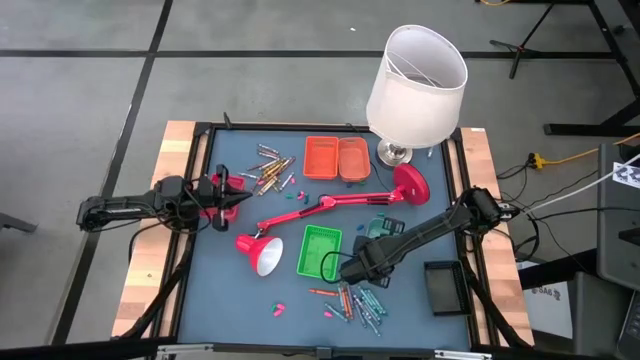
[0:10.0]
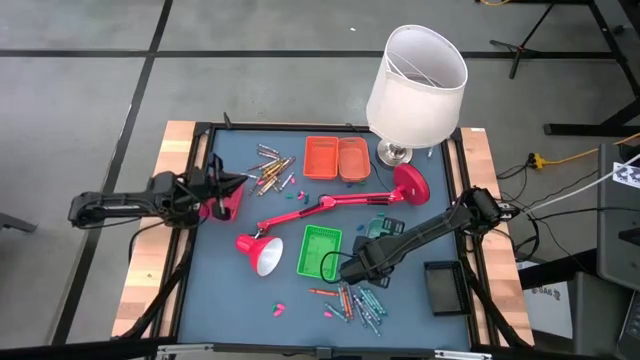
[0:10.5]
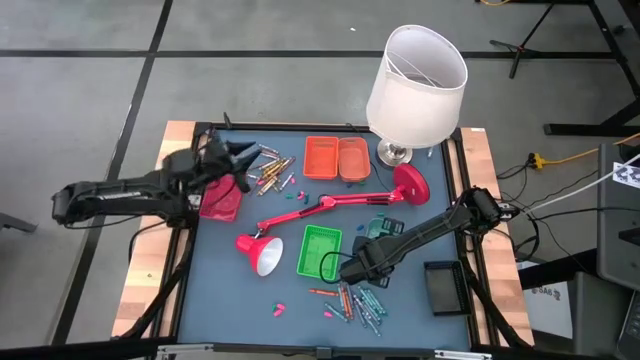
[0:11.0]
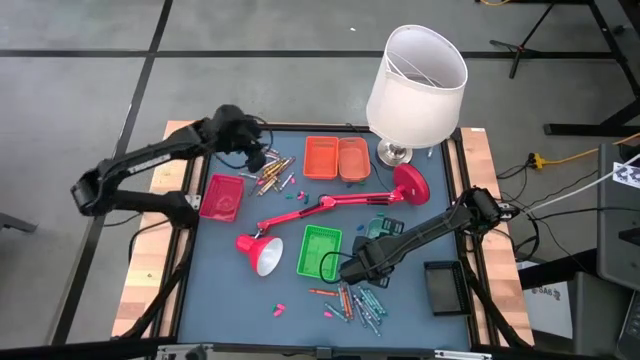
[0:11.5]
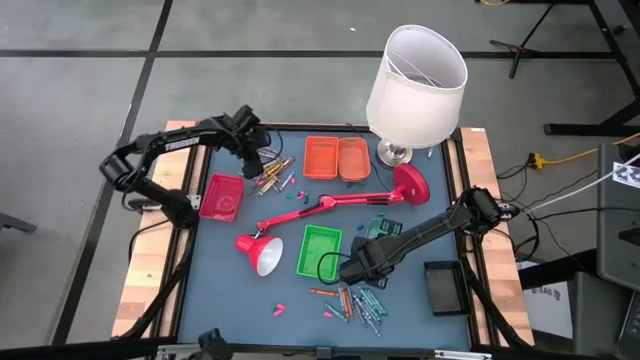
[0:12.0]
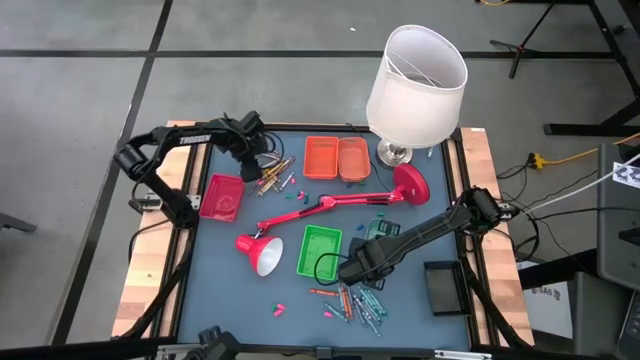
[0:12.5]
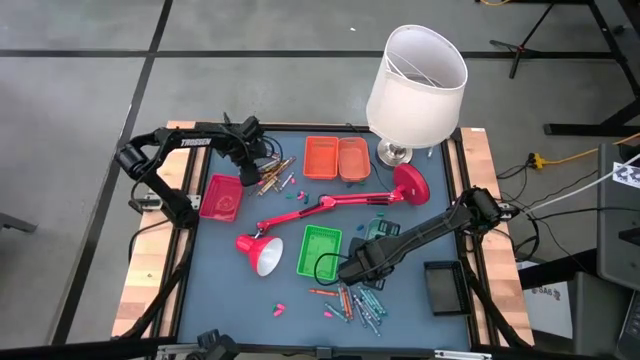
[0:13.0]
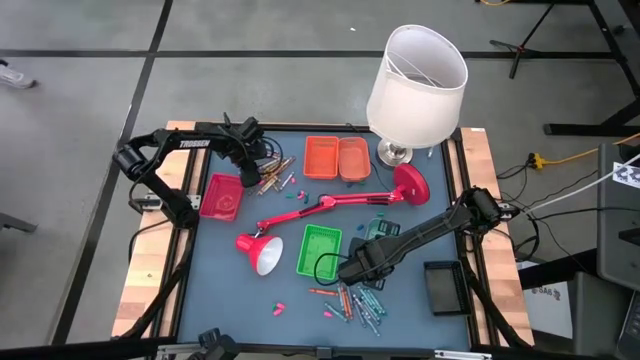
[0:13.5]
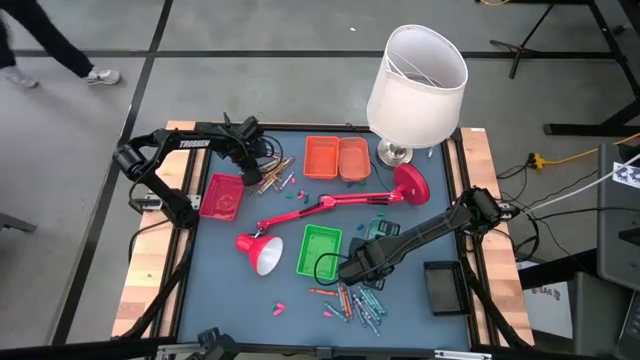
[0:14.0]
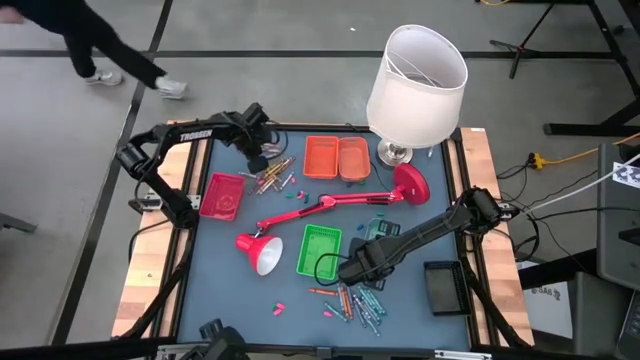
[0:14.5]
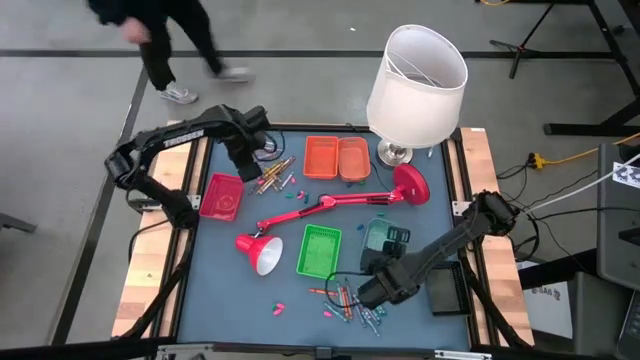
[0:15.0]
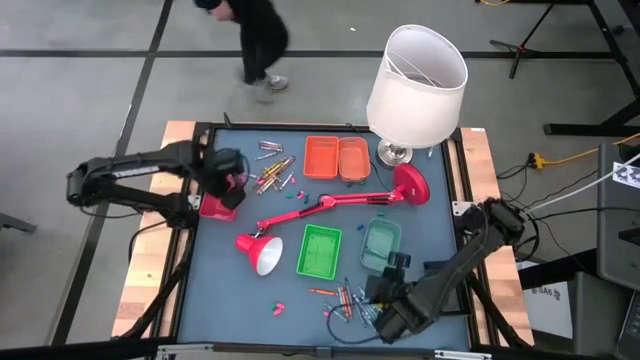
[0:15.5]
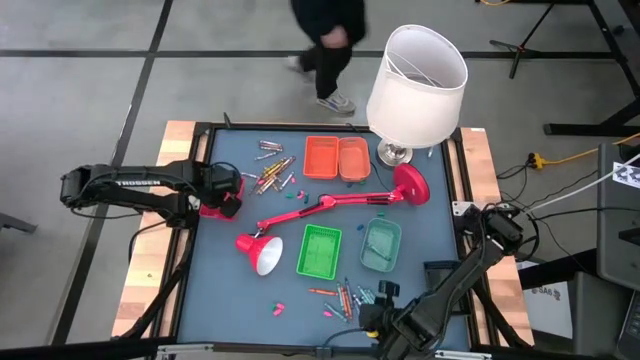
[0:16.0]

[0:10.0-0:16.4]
Task: Sort crayons
Put the brown crayon into the red bin

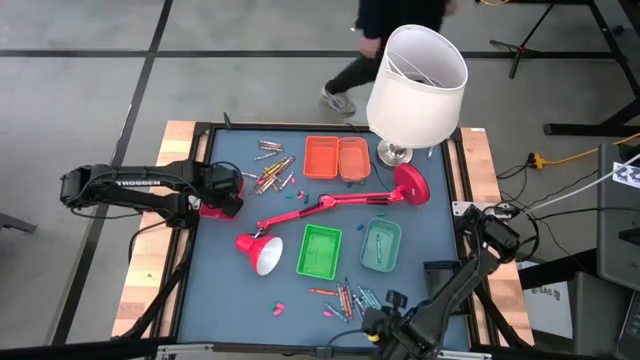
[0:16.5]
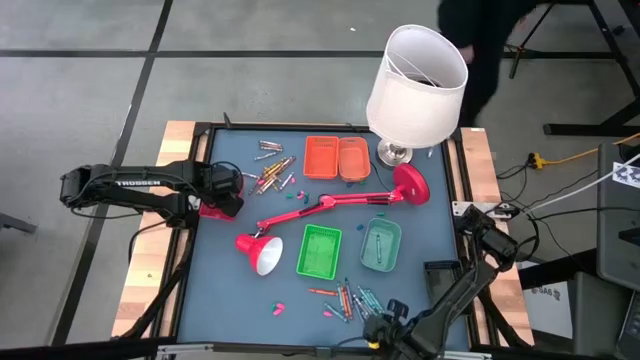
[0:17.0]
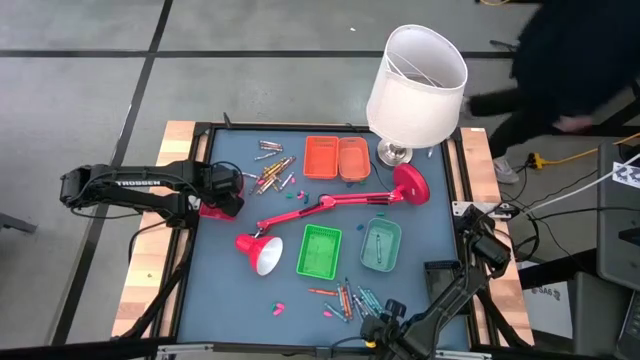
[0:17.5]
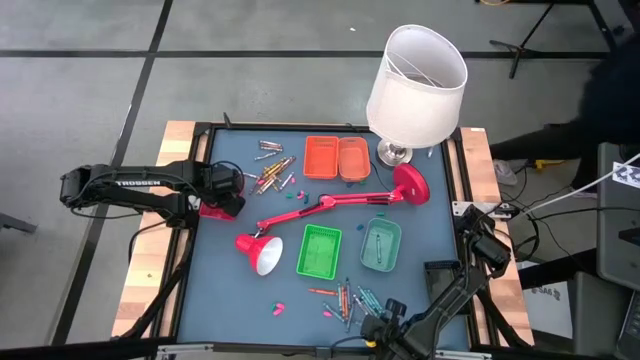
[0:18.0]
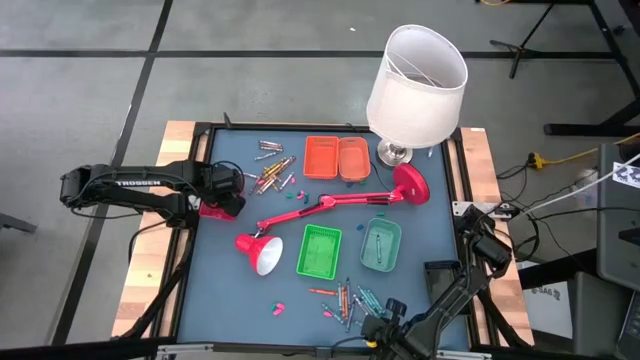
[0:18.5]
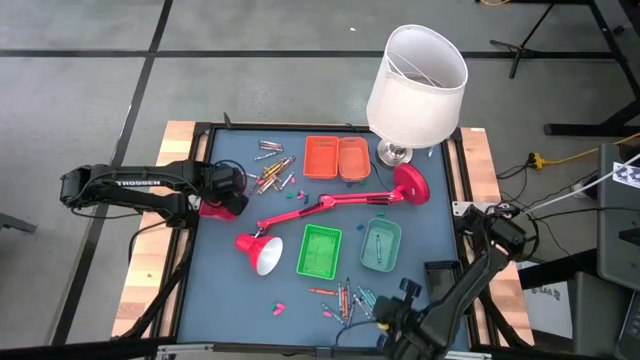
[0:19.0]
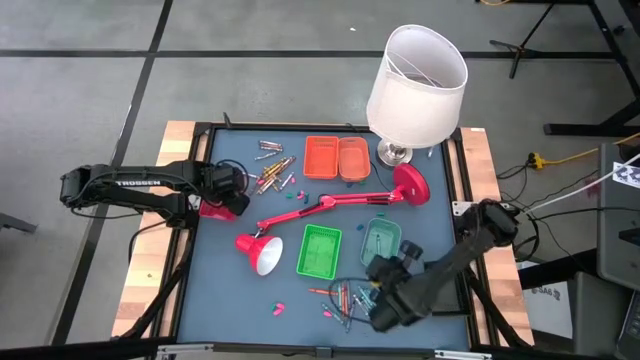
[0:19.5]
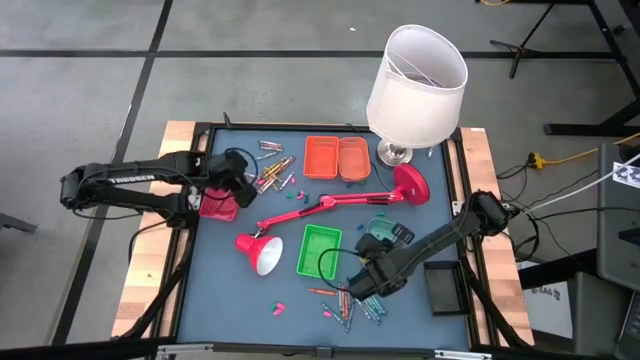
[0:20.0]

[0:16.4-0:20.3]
Put the green crayon into the light green bin

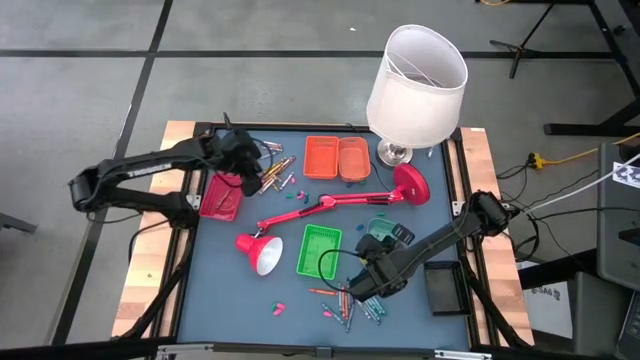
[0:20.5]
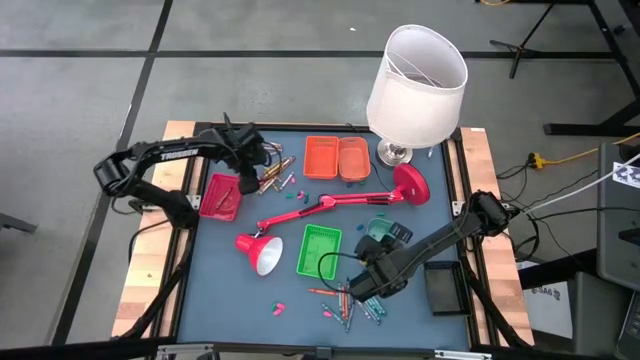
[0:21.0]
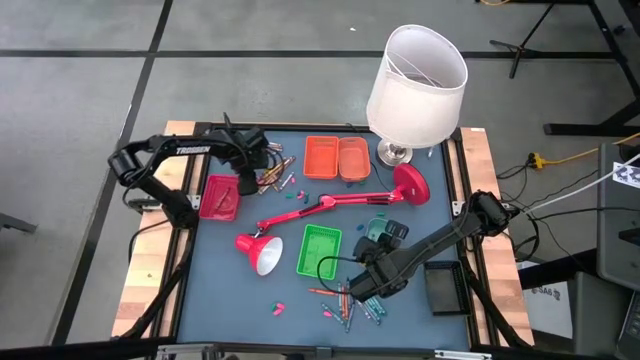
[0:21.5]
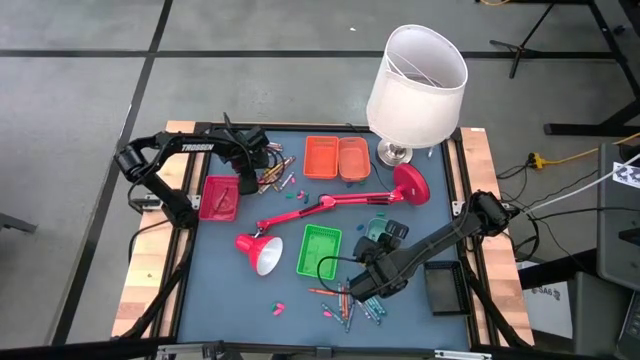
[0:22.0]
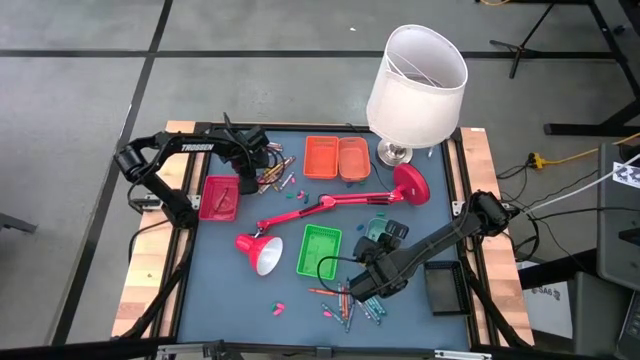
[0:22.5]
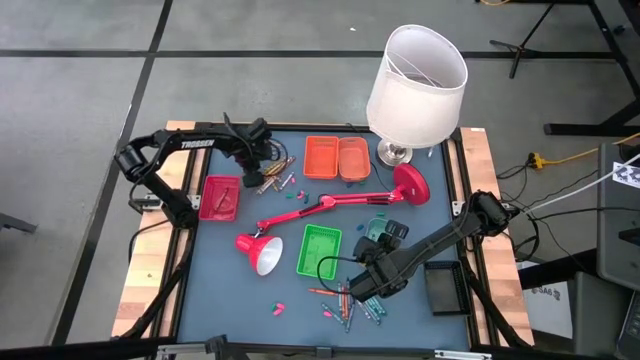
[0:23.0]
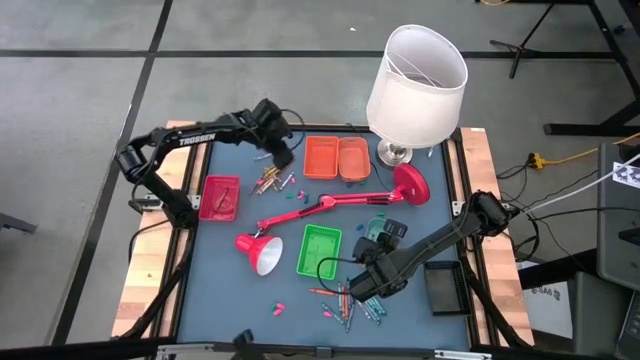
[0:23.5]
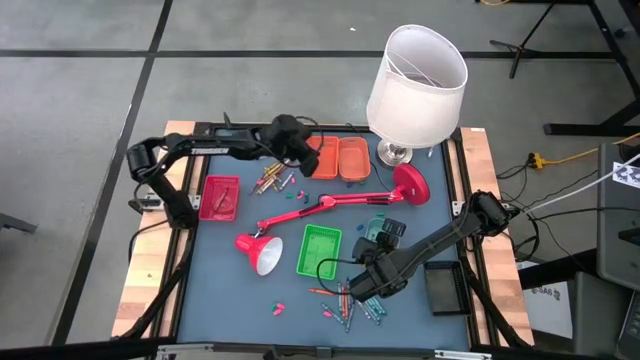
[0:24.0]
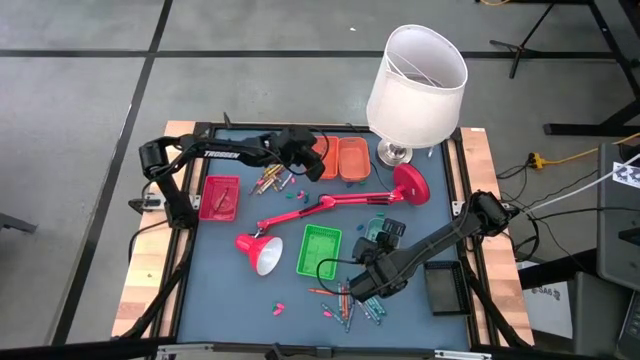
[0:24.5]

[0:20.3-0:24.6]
Put the gray crayon into the orange bin

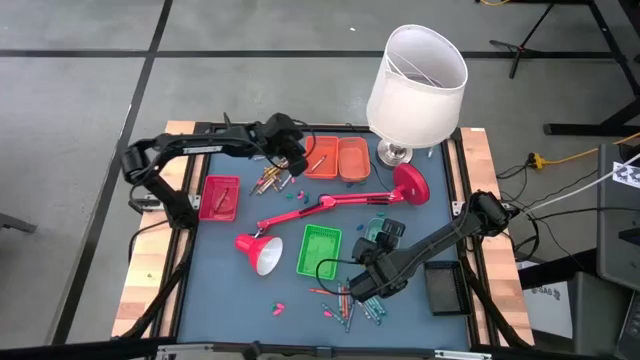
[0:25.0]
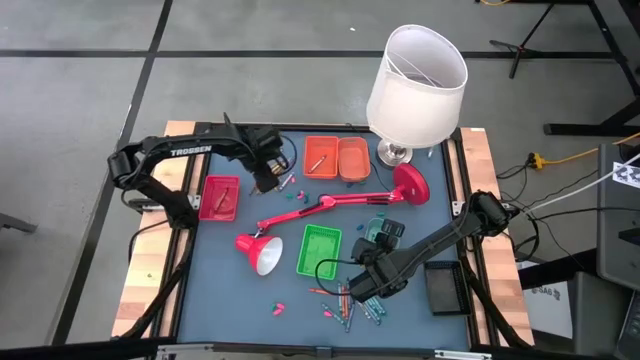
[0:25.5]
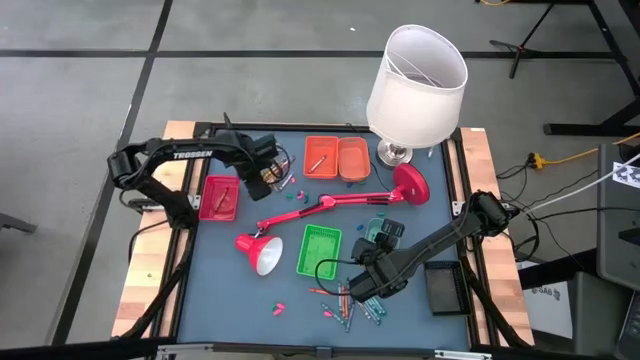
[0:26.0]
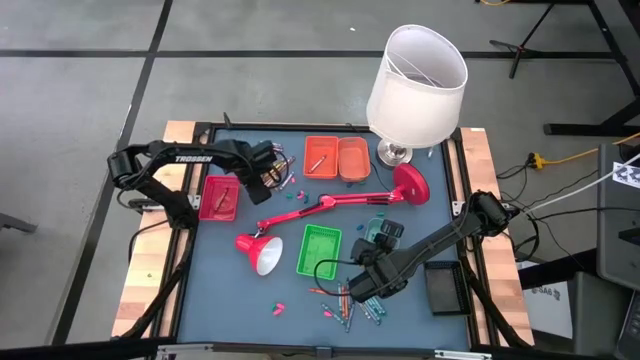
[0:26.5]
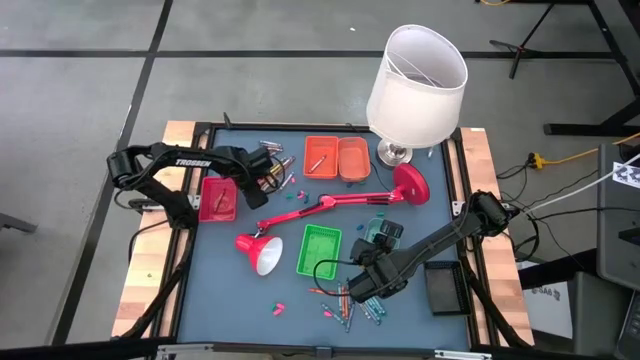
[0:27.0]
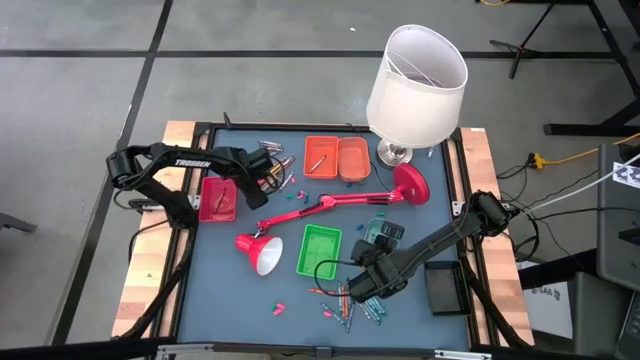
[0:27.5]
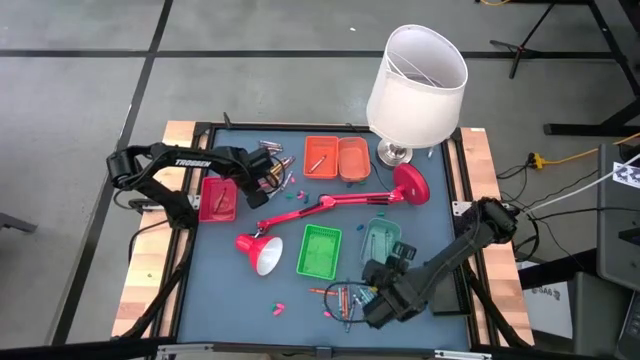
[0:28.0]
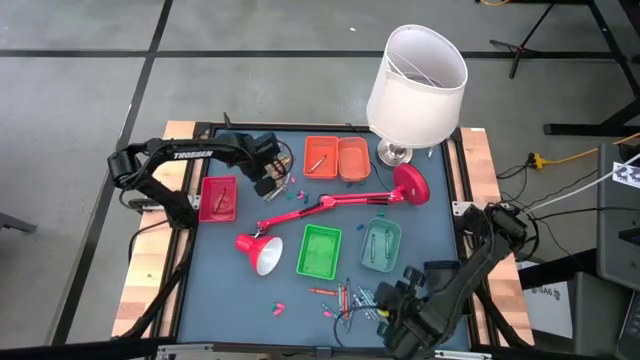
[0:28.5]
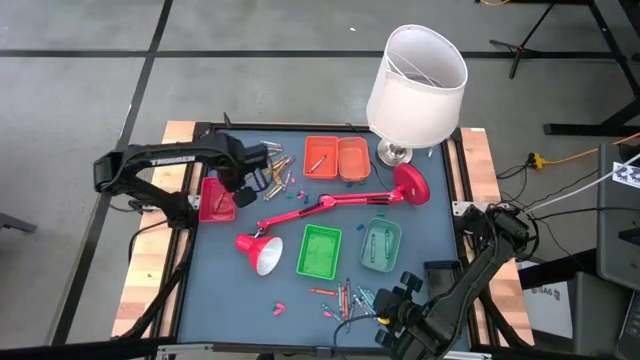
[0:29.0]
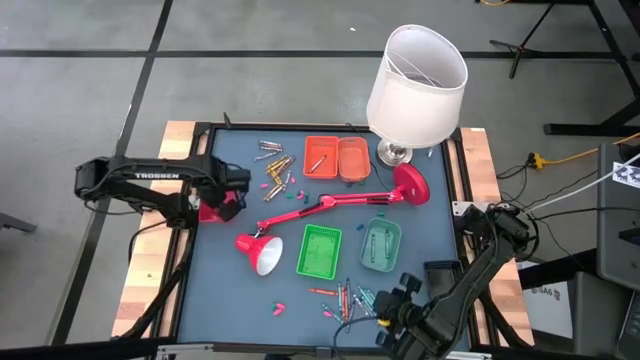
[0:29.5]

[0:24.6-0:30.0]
Put the brown crayon into the red bin
